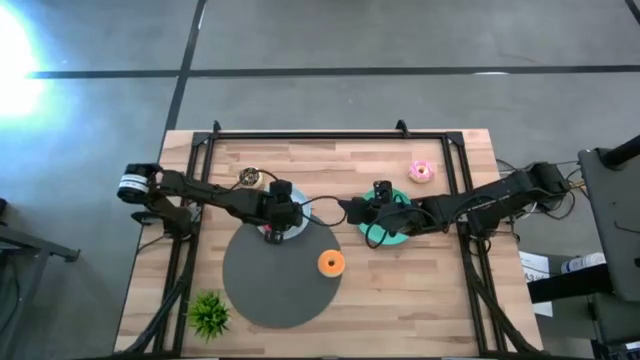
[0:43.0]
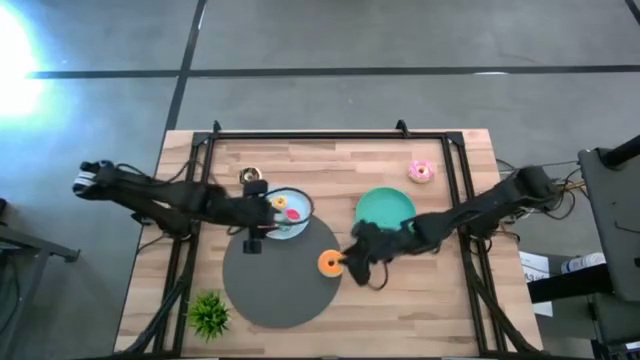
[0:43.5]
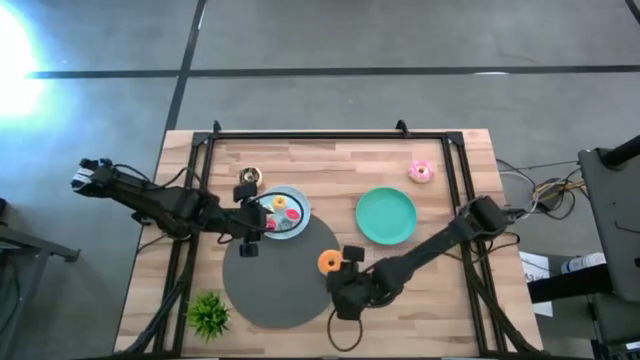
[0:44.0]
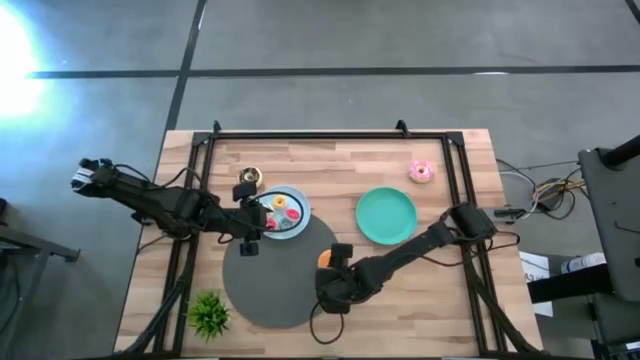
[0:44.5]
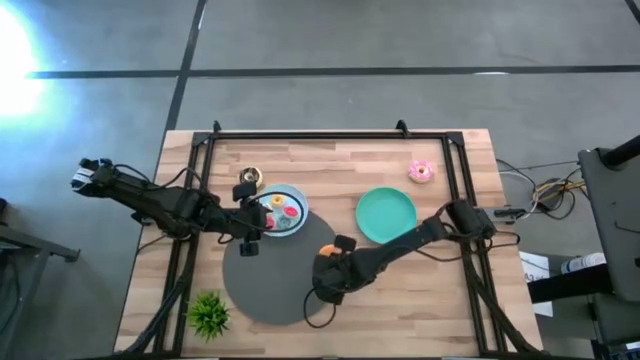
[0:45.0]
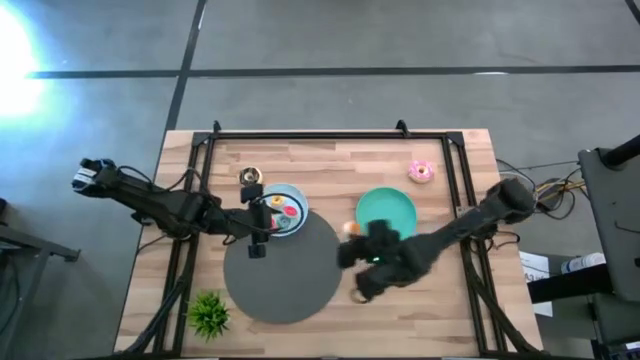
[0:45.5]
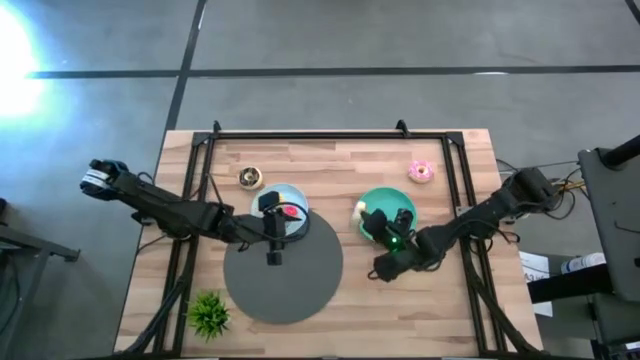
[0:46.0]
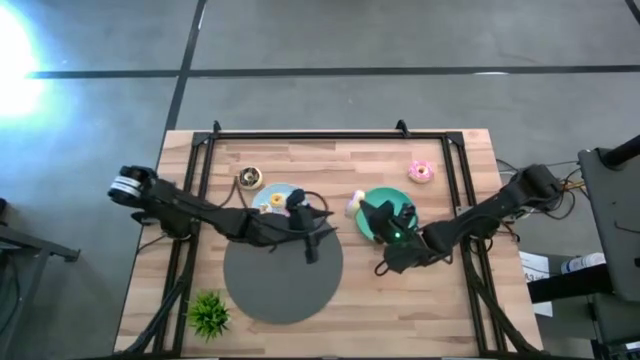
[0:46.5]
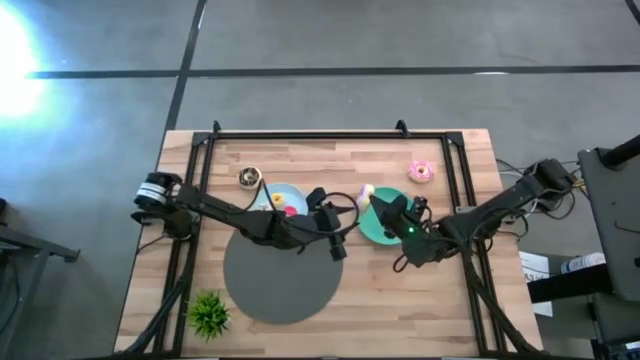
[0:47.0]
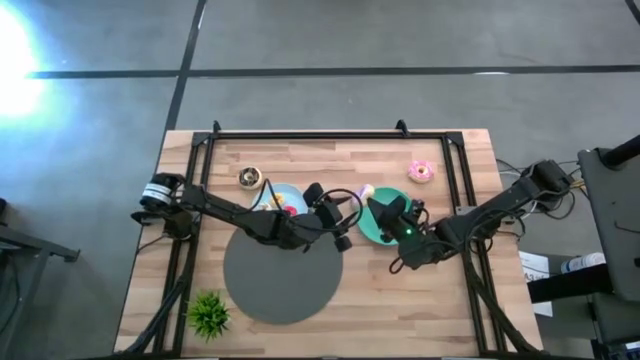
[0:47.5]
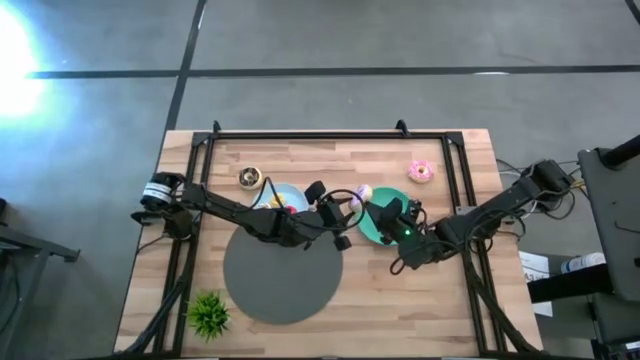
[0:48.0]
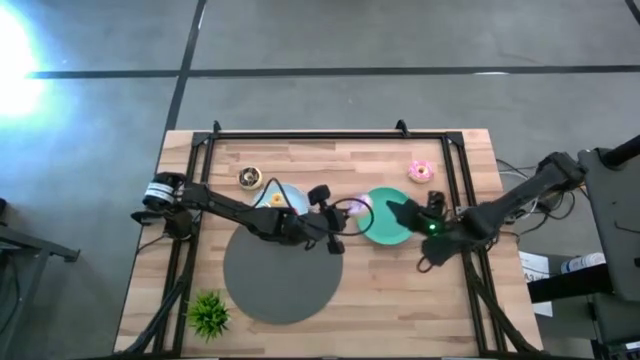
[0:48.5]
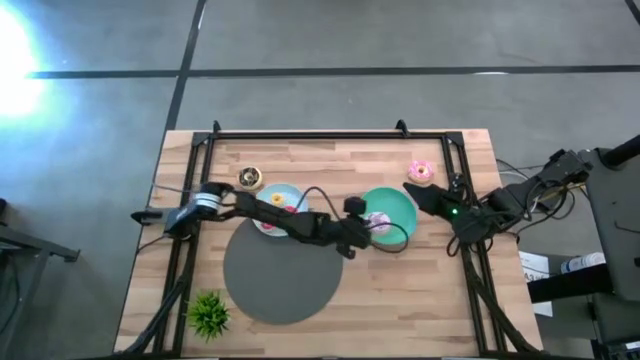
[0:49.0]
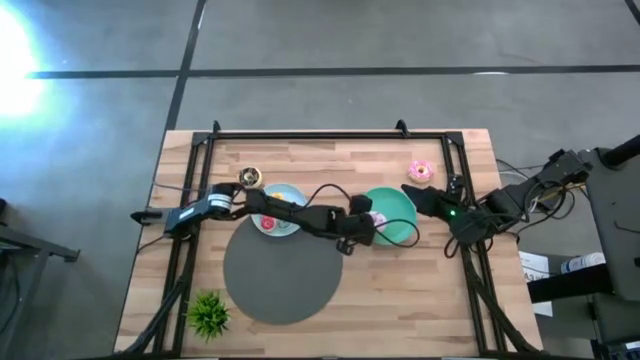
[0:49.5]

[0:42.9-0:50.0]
Task: Pick & Place donuts
Put the big purple donut on the blue plate

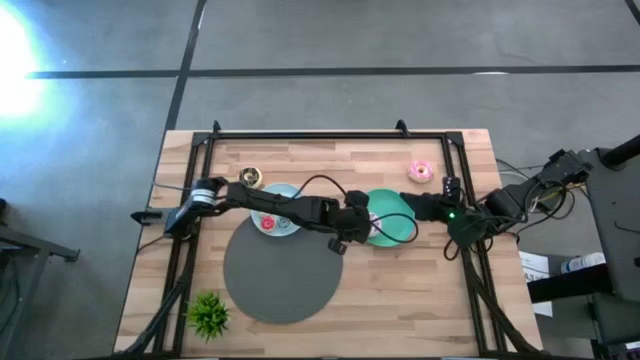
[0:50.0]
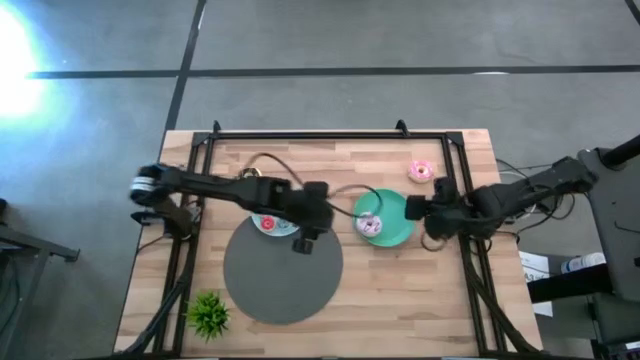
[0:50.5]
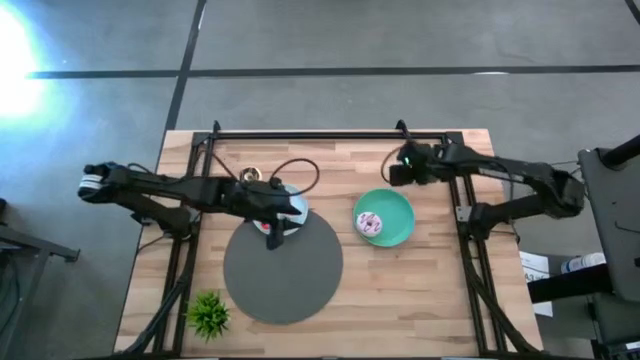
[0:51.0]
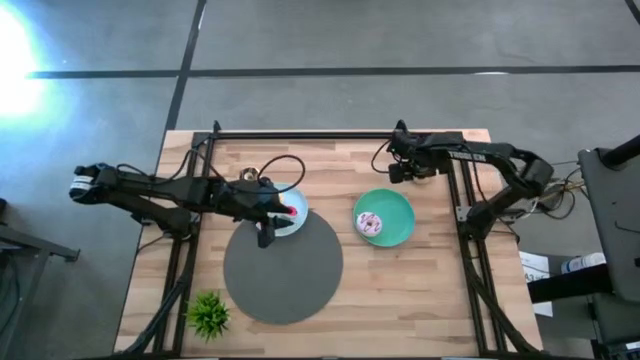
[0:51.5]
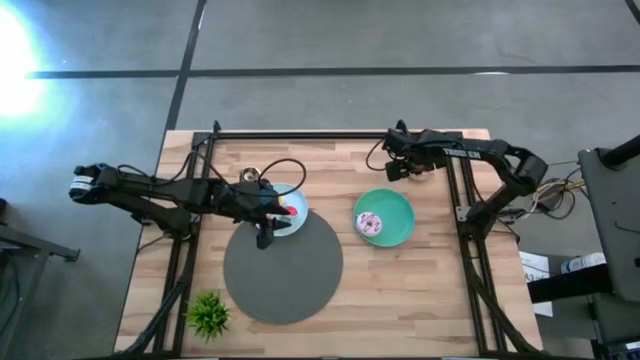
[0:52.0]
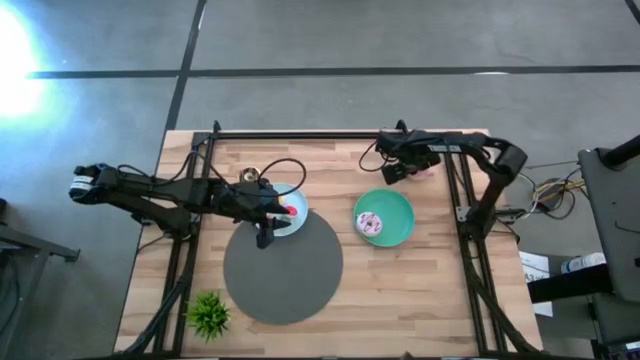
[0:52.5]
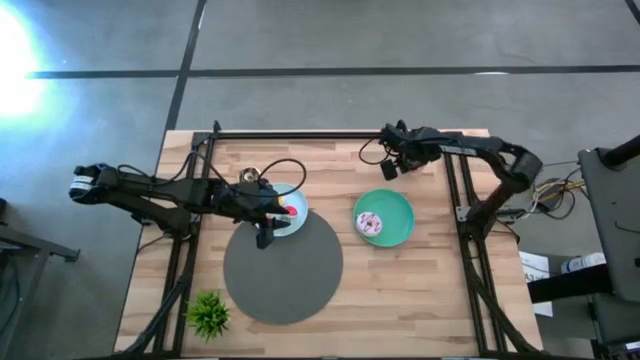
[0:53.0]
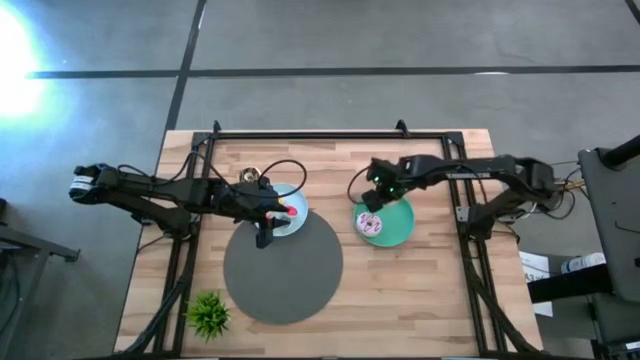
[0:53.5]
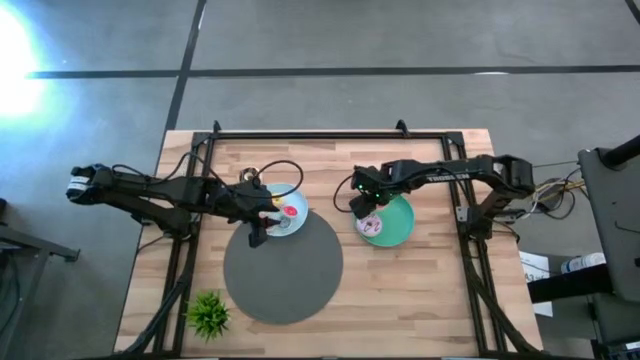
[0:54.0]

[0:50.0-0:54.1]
Put the big pink donut on the blue plate

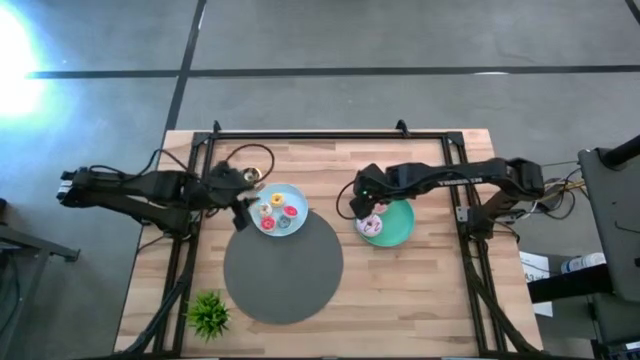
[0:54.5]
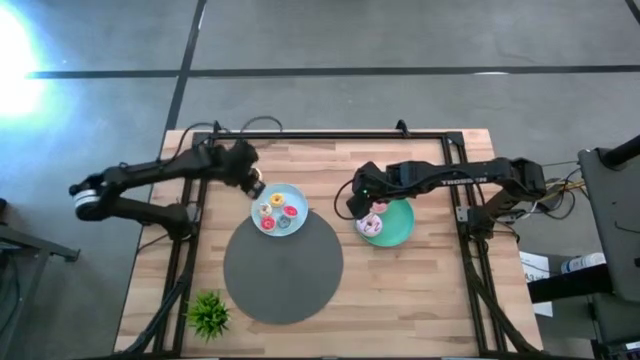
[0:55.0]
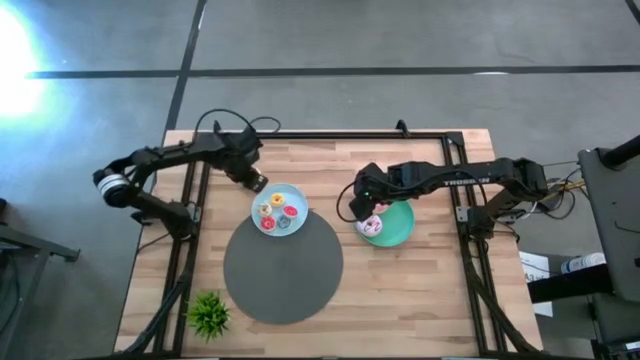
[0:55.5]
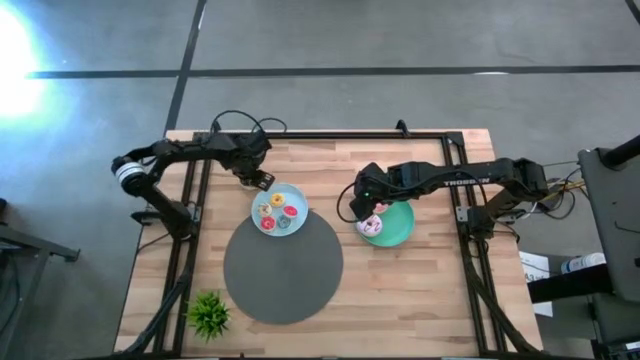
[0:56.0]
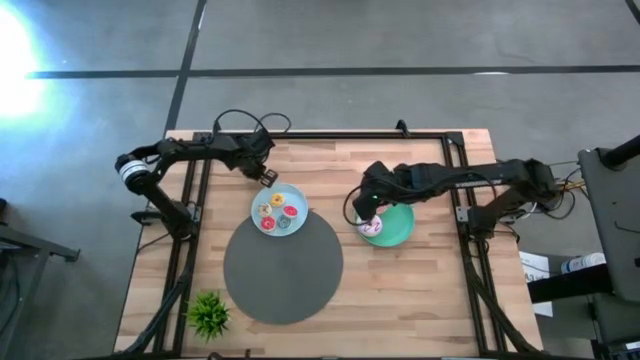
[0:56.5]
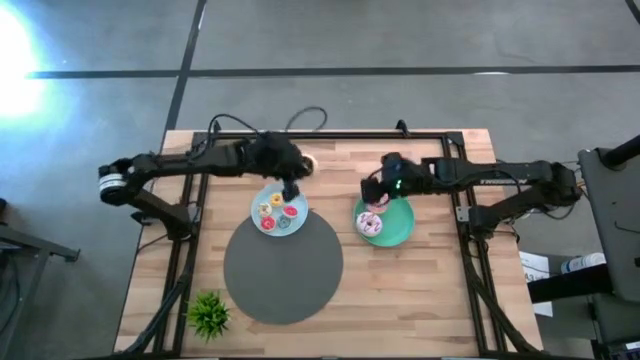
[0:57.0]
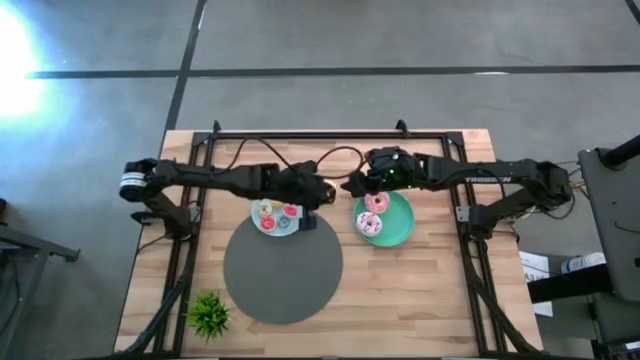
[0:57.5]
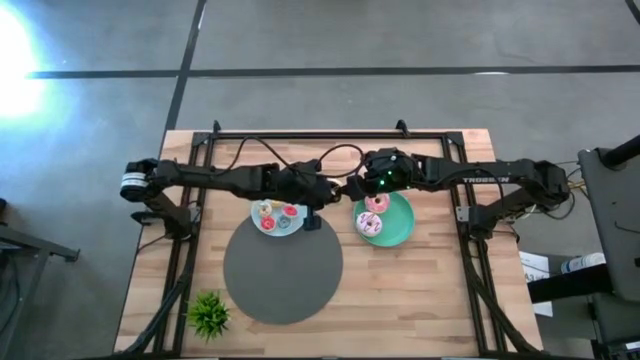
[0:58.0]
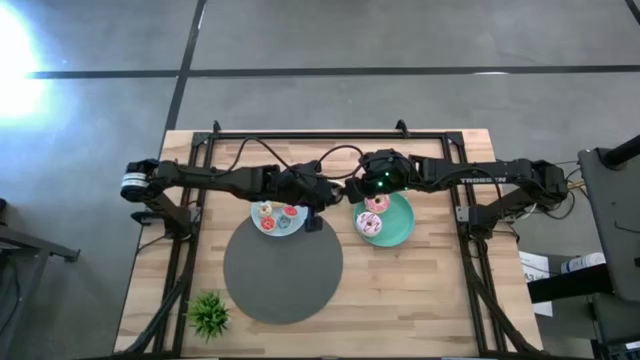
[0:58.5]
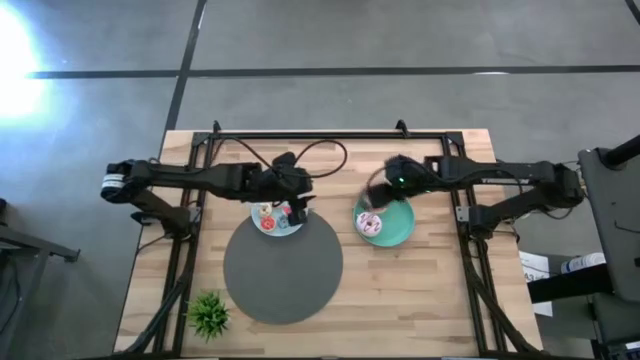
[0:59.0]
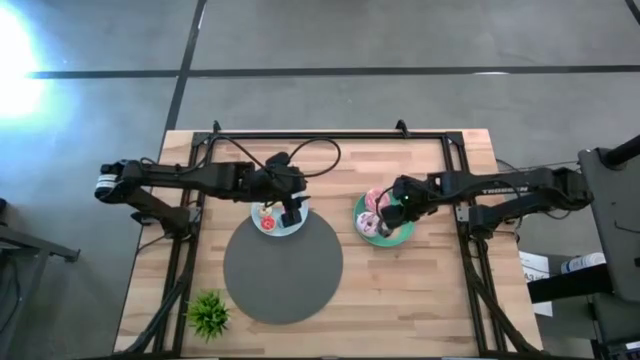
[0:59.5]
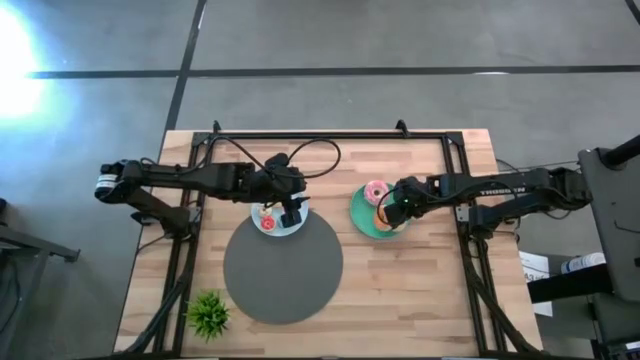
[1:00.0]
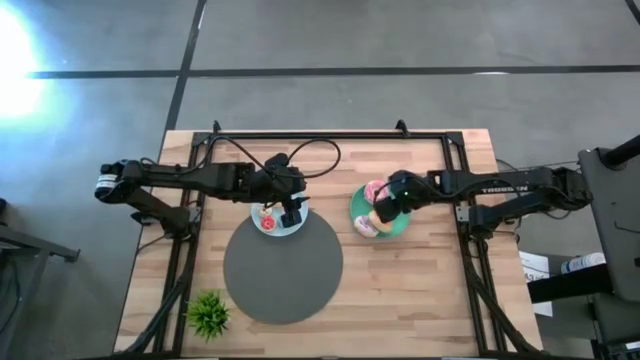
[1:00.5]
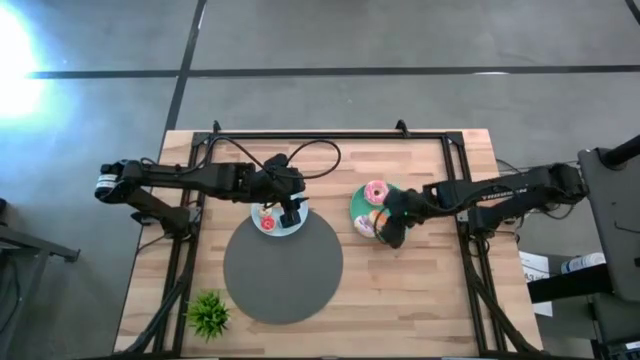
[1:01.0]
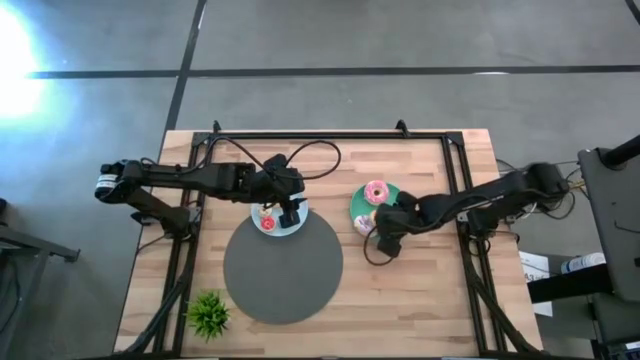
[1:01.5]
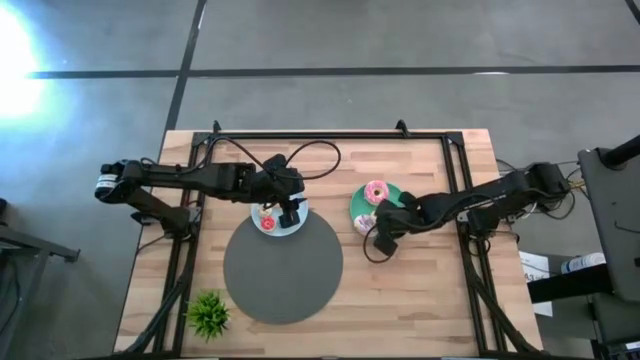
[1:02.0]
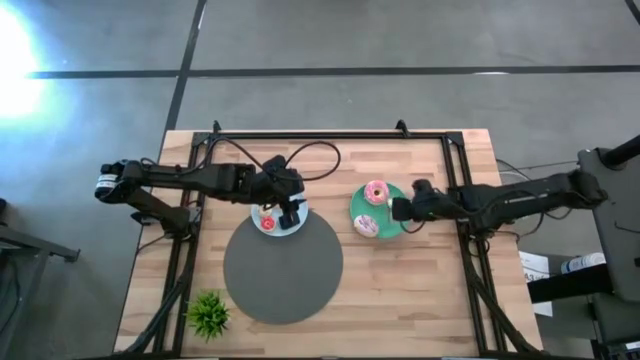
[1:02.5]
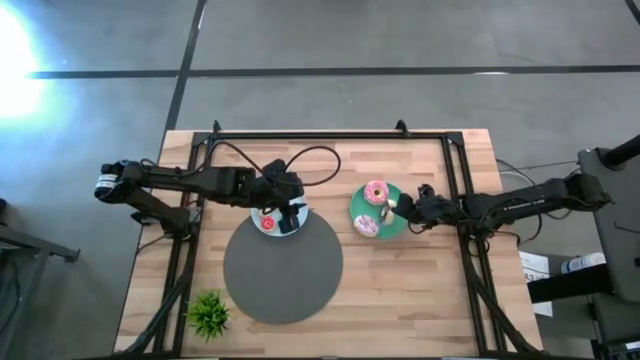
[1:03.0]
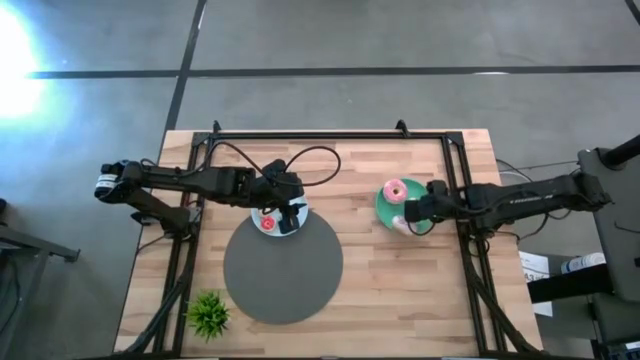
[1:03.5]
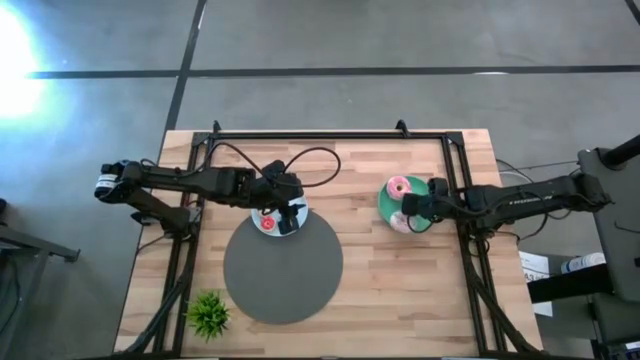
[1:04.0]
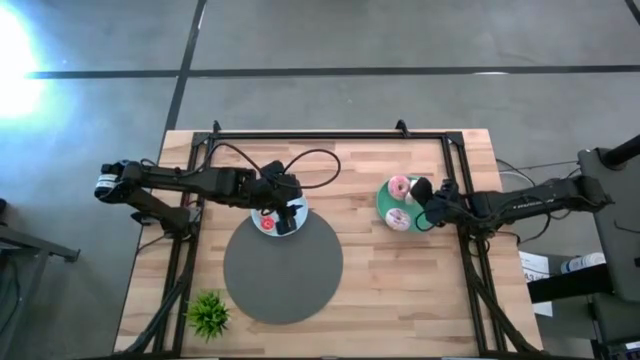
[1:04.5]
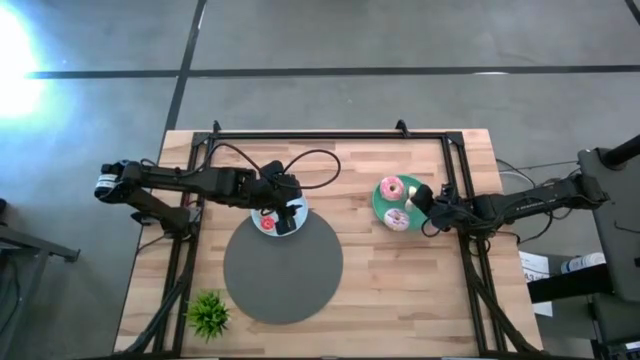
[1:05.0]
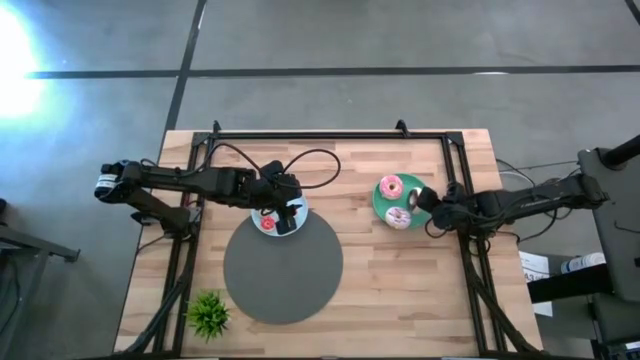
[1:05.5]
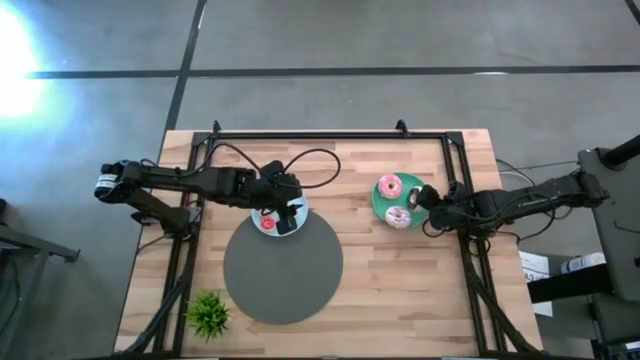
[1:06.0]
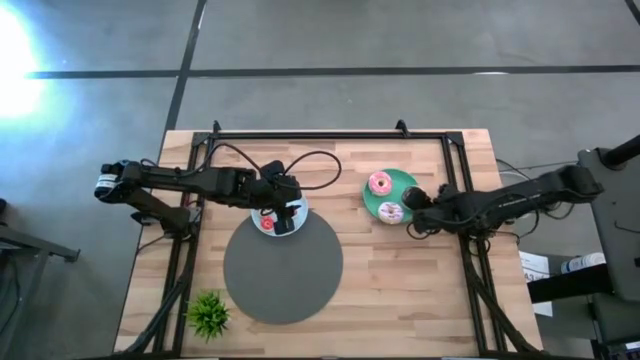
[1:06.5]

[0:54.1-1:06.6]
Put the big black donut on the blue plate
